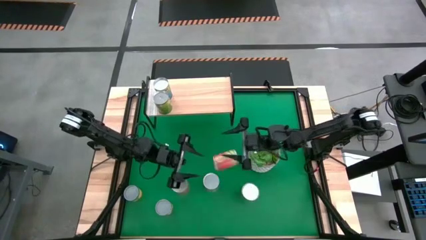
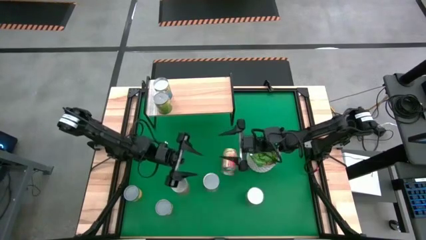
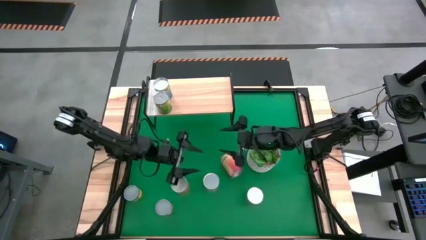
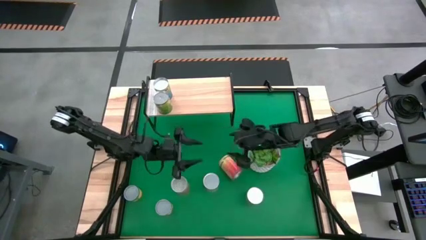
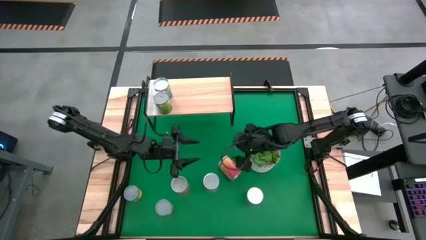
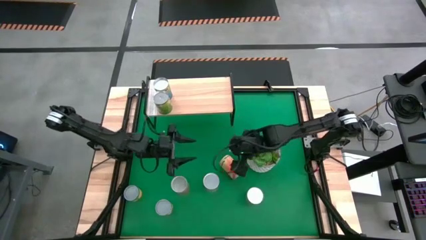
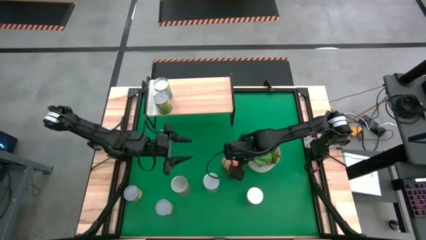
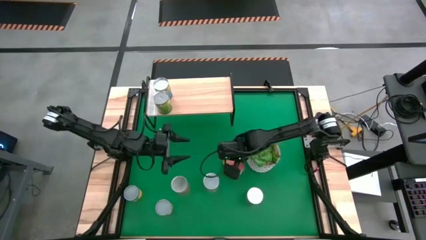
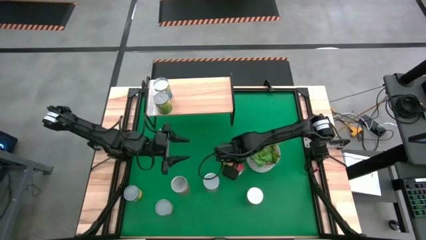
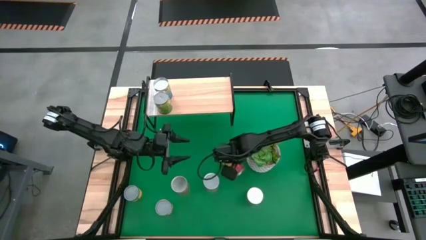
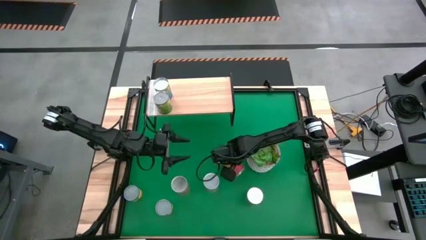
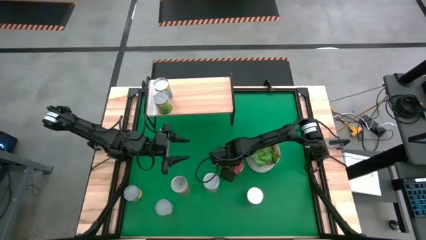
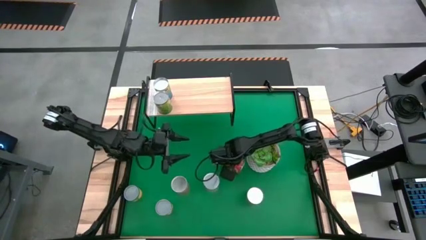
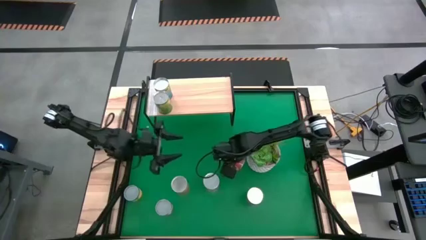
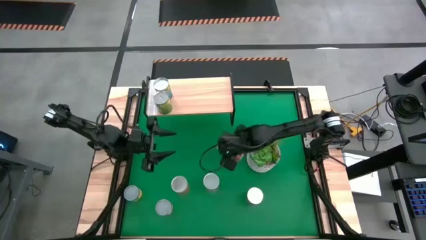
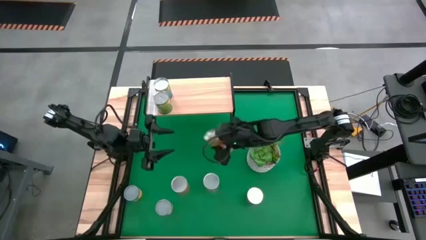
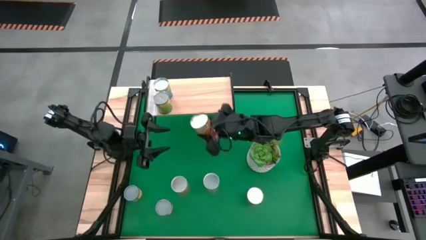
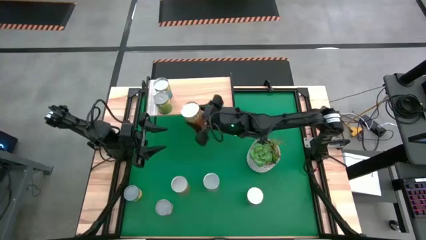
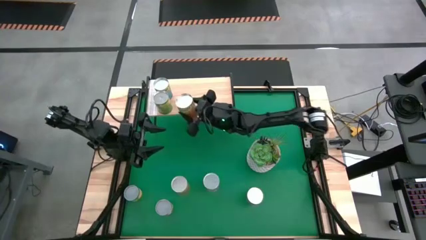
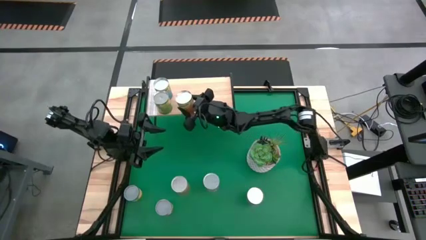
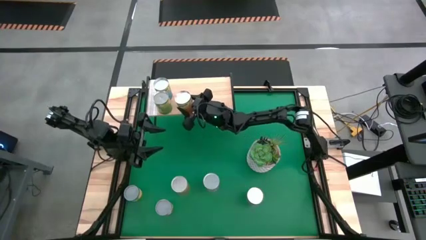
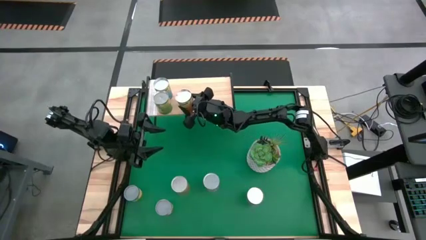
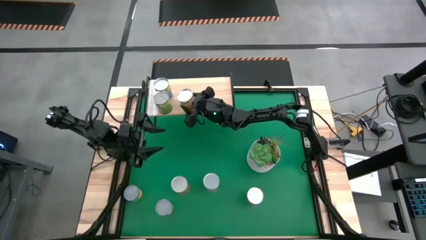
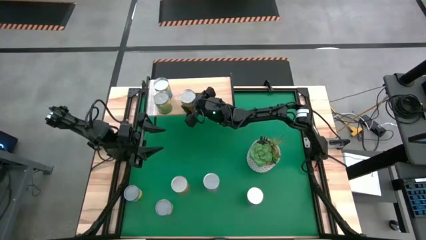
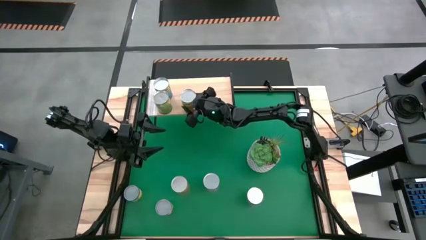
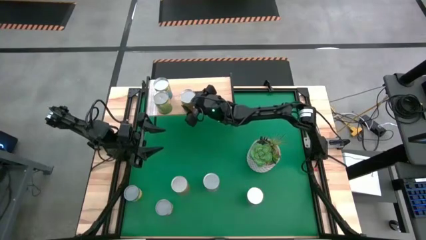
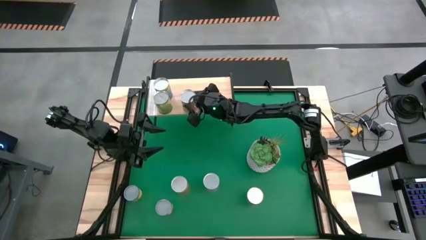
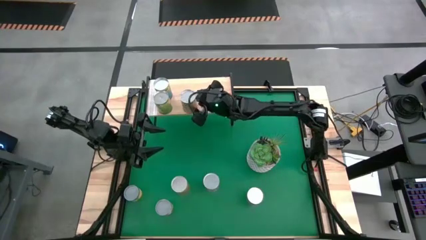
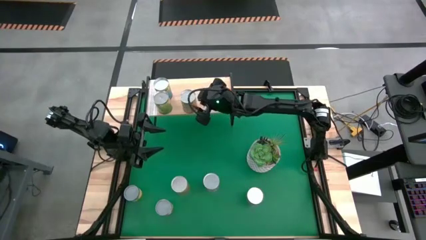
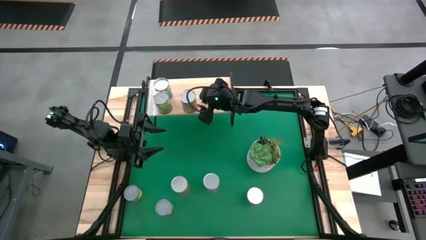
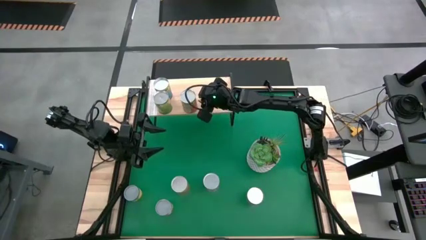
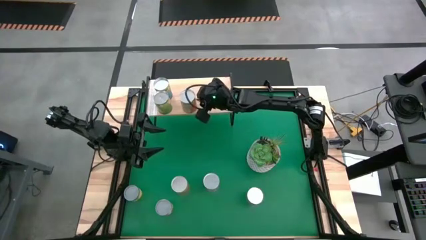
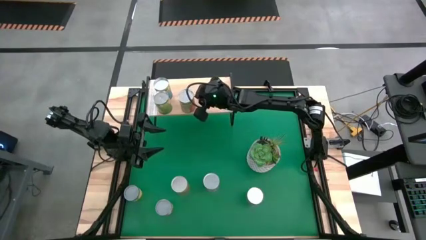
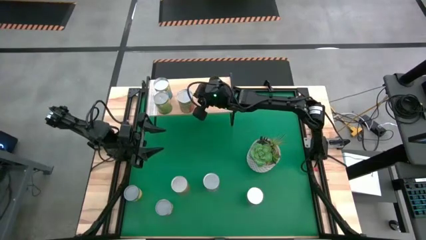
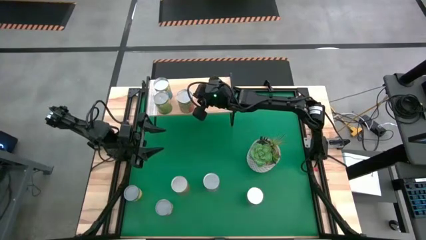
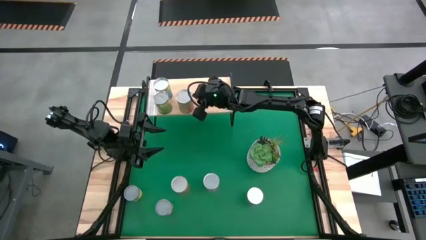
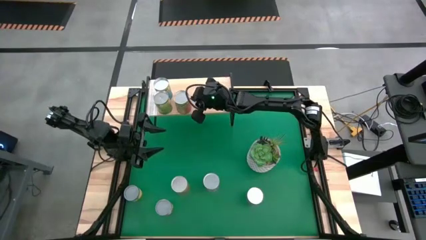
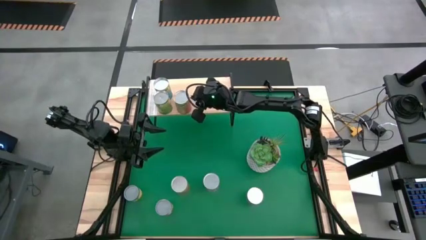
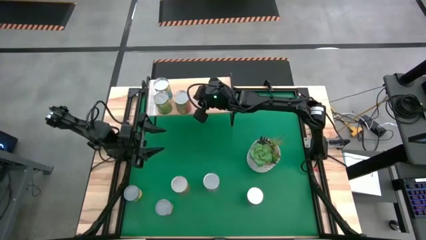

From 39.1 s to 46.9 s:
Task: Pick and place cans onto a shelf
Put the top canned pineapple on the shelf

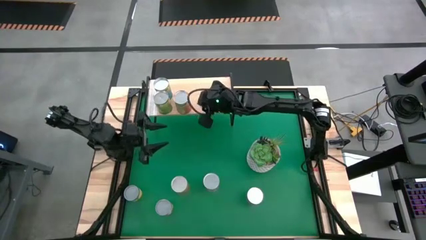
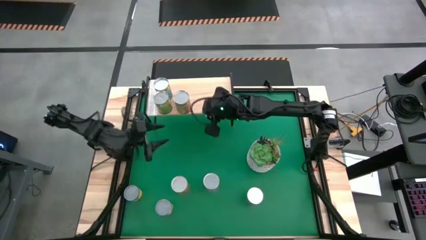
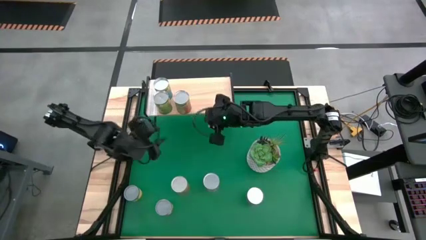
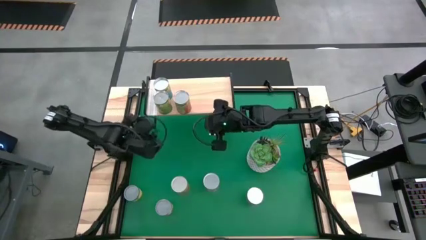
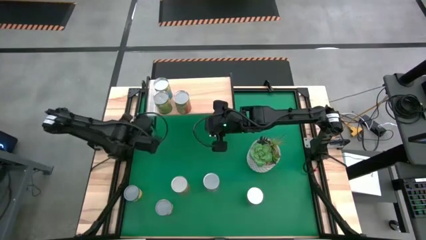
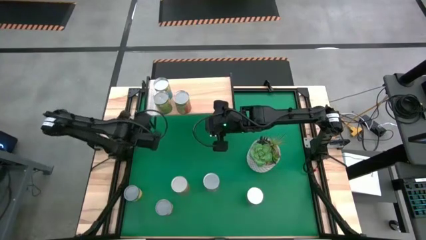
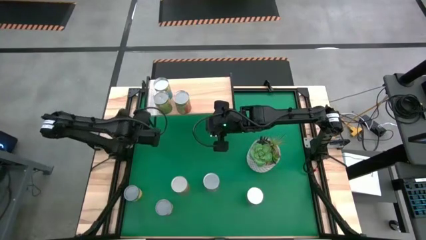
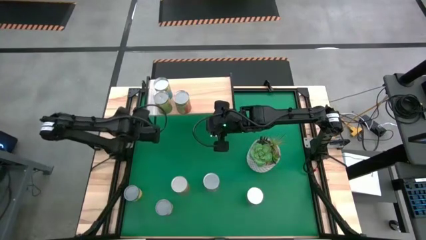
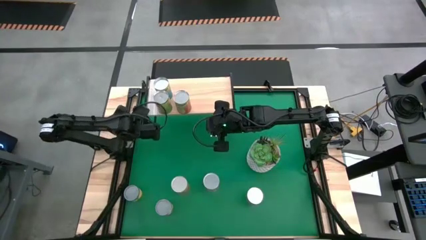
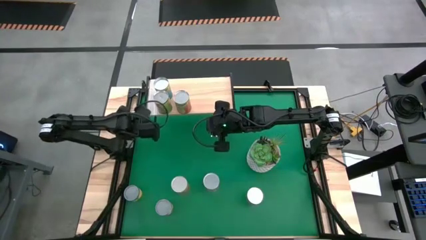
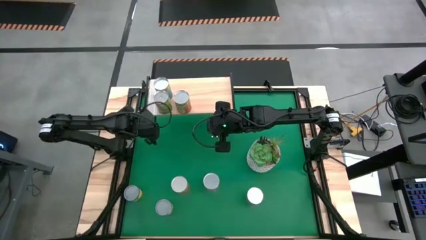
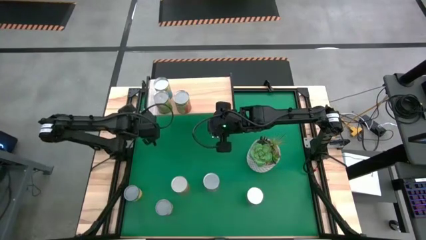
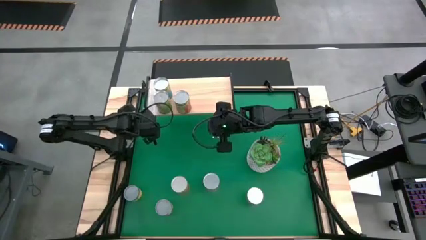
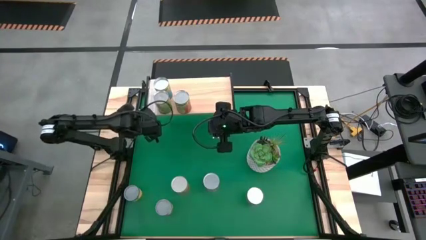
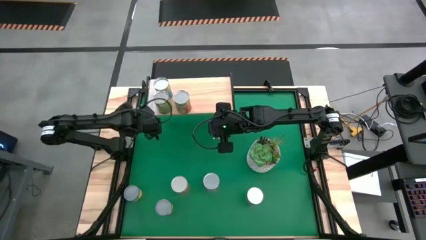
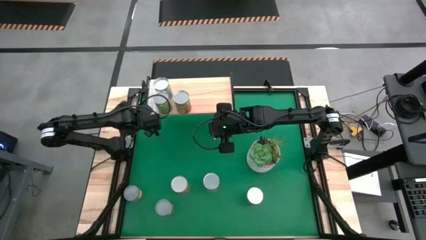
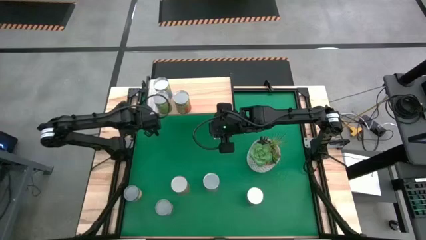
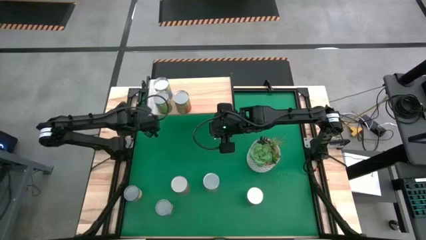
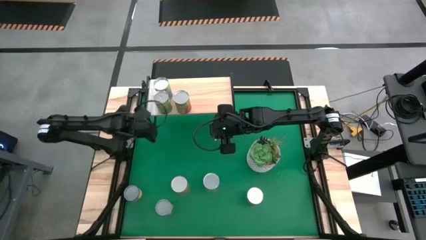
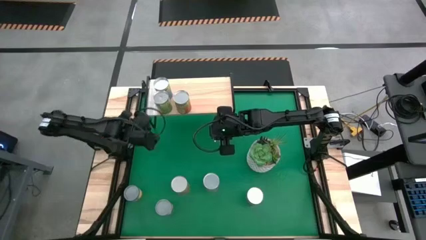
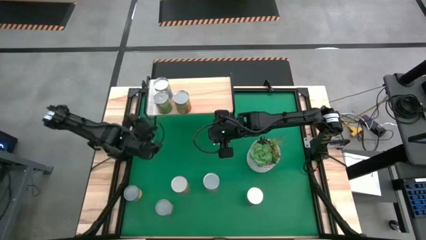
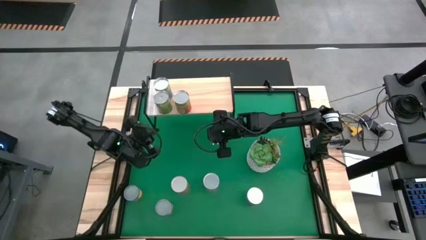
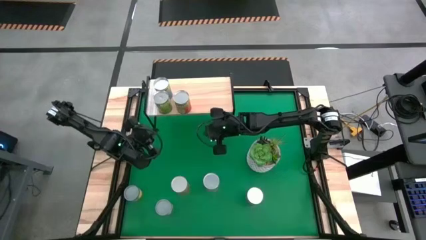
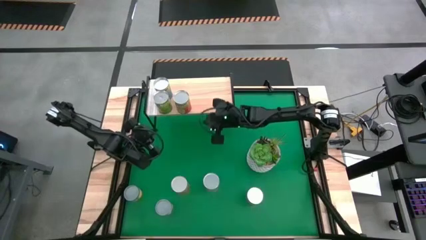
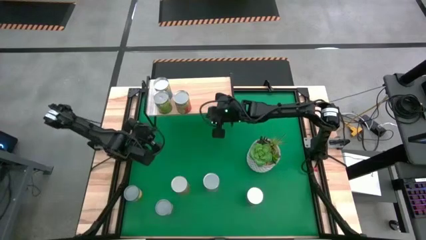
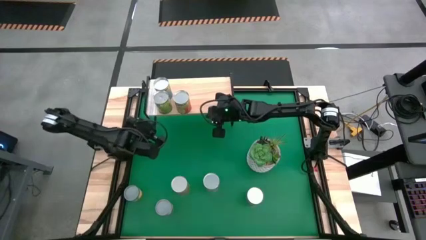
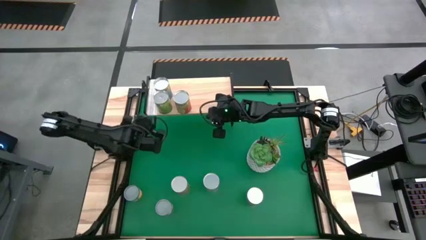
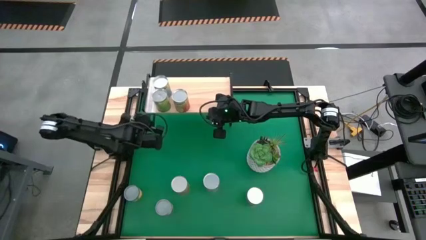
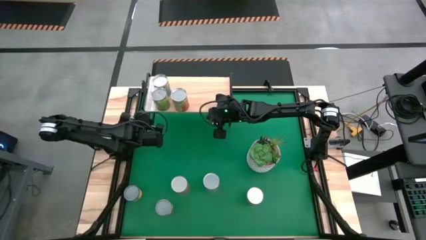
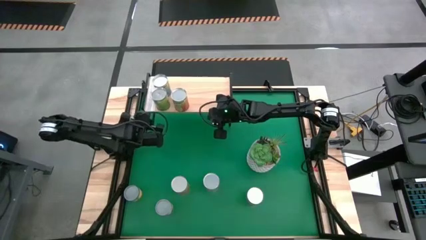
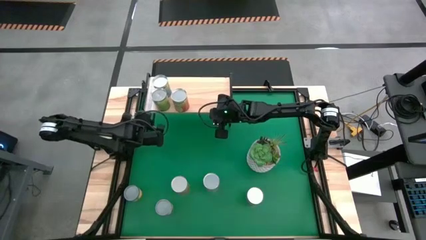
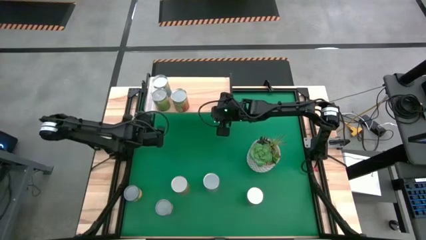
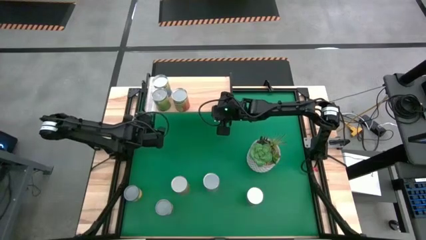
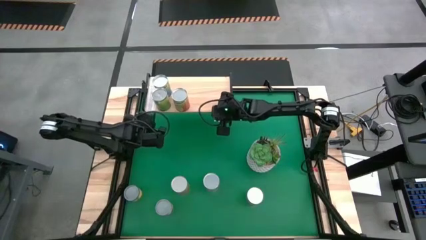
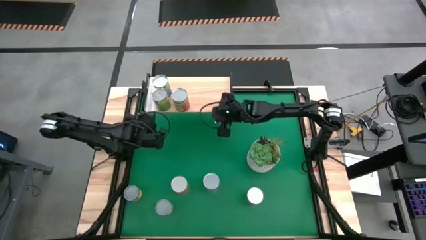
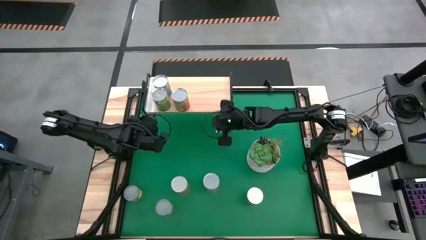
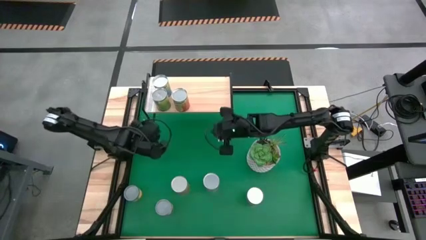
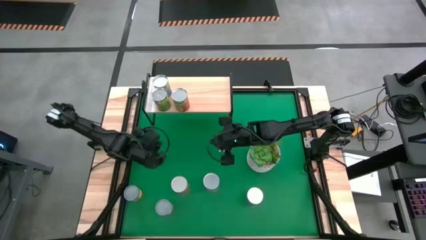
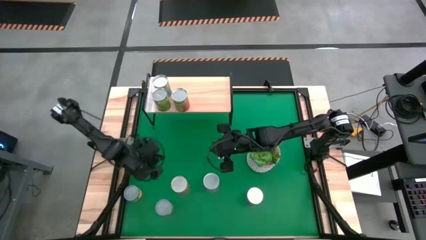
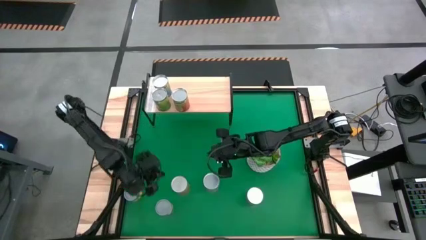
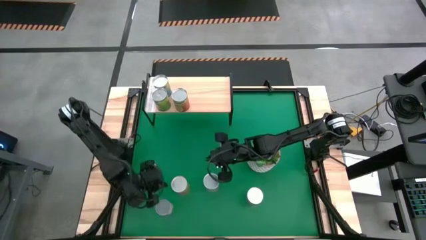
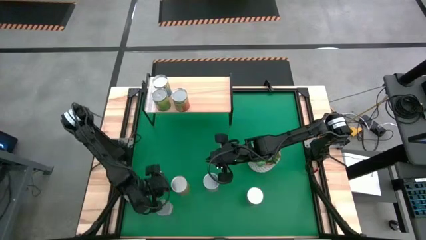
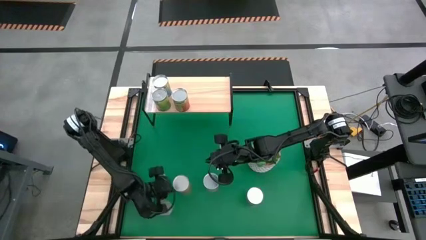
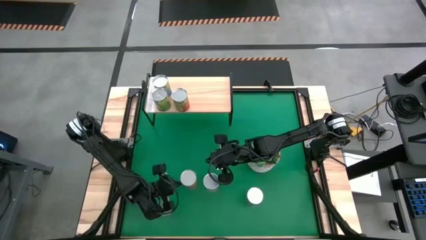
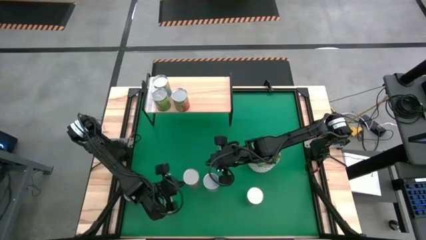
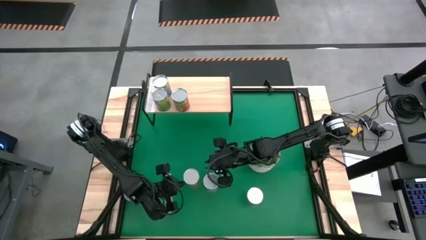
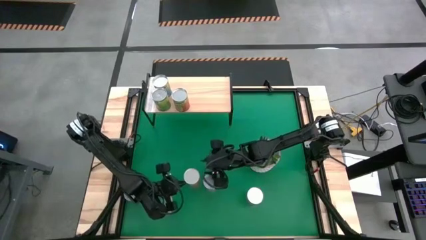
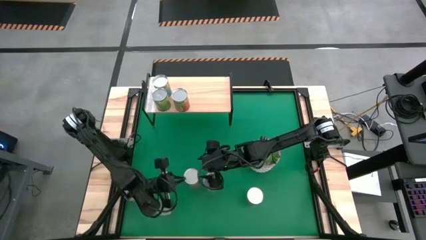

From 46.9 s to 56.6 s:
Put the canned pineapple on the shelf
